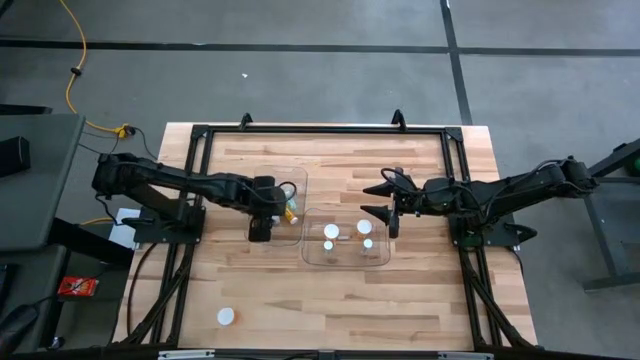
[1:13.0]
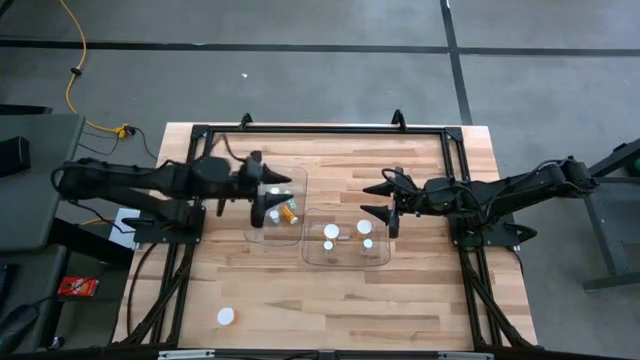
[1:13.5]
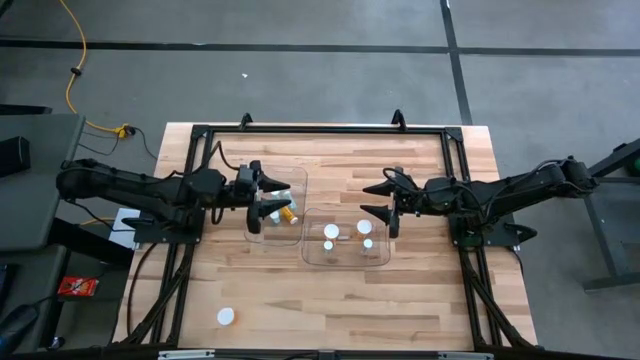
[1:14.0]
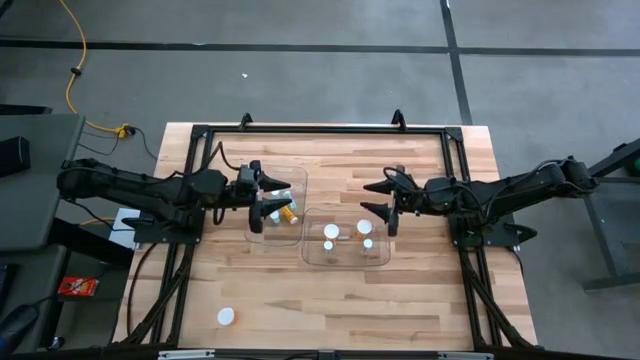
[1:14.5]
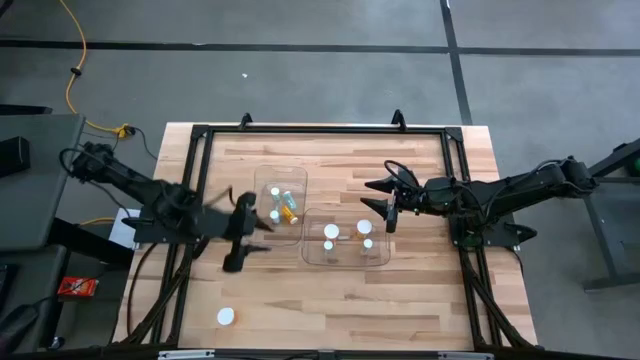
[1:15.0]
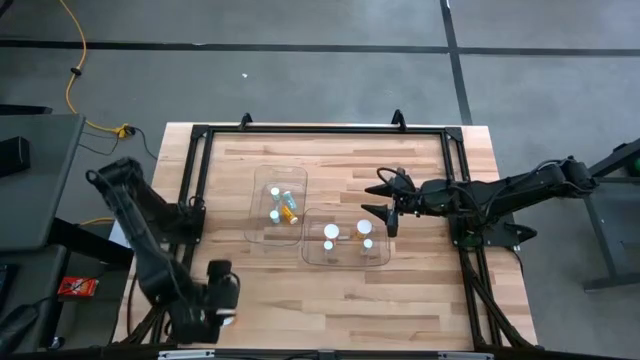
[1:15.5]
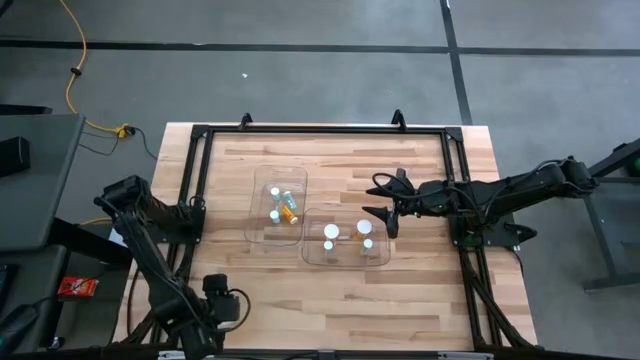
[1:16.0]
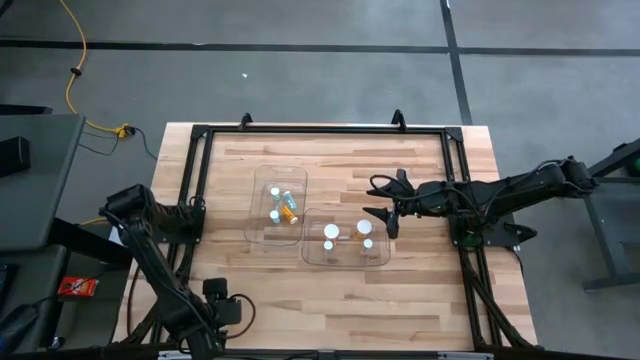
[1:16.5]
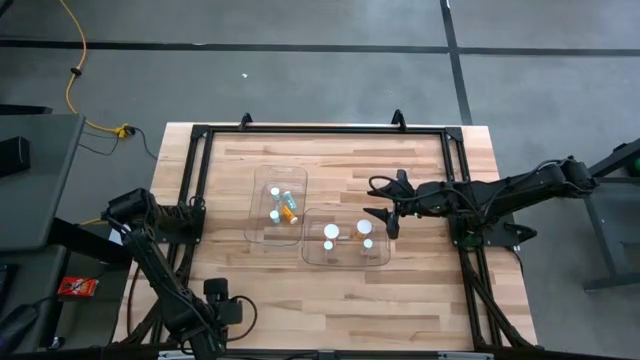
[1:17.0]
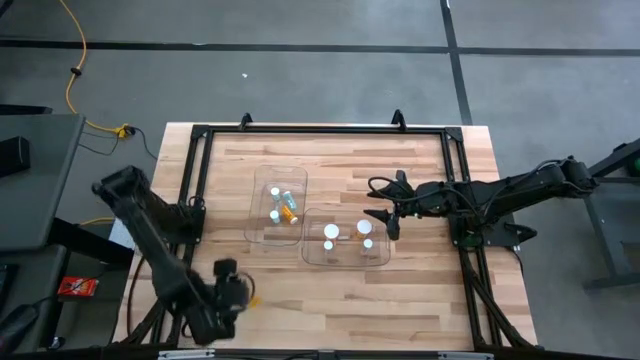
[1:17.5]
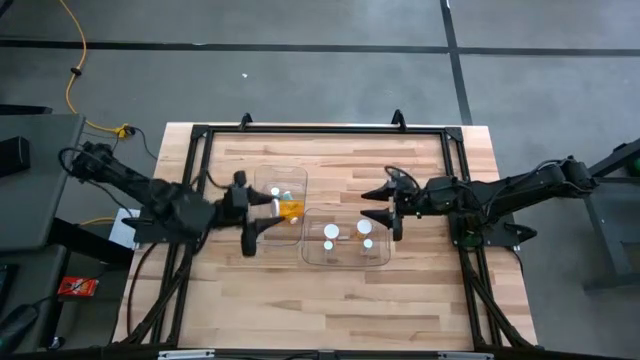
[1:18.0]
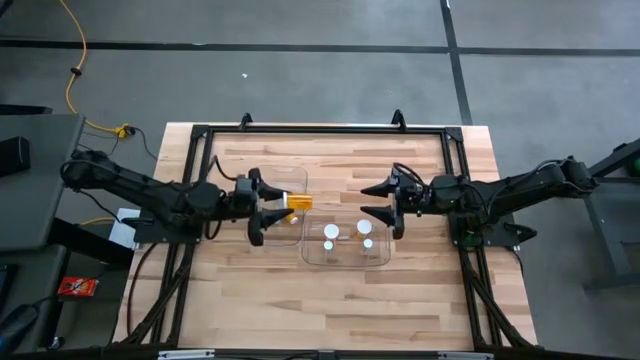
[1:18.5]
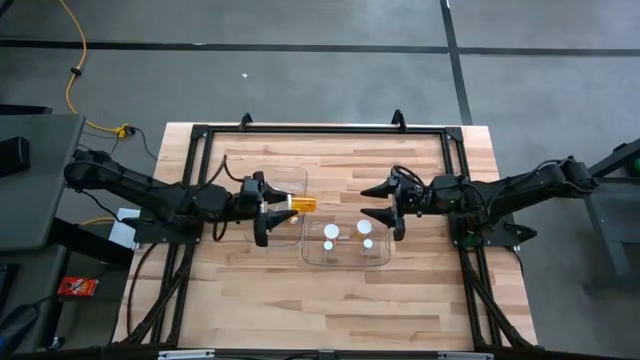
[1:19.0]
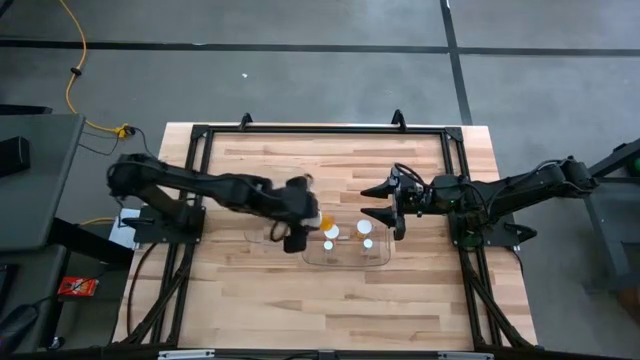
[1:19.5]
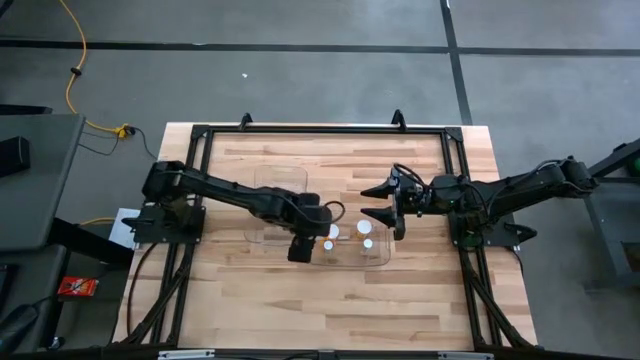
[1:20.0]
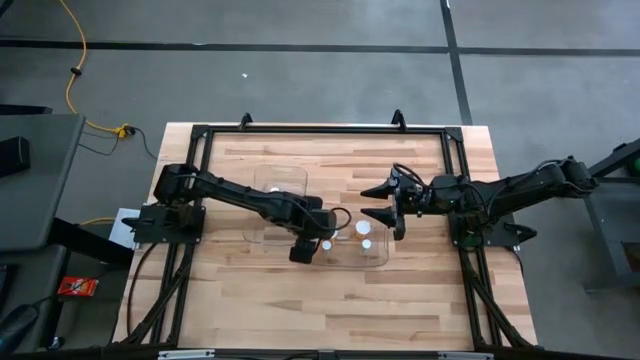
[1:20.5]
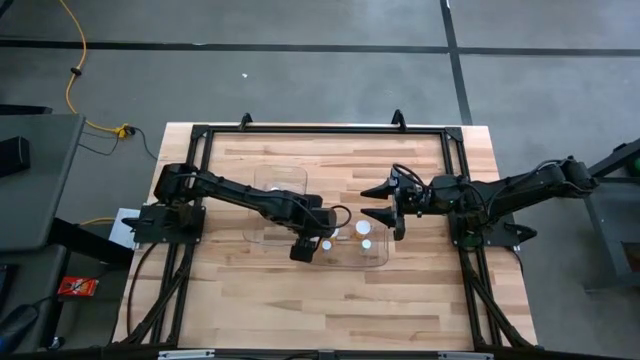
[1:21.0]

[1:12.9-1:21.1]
Task: Pick and place medicine bottles into bin by pill shape (circle, oval)
Put the orange capsule bottle into the right transparent bin

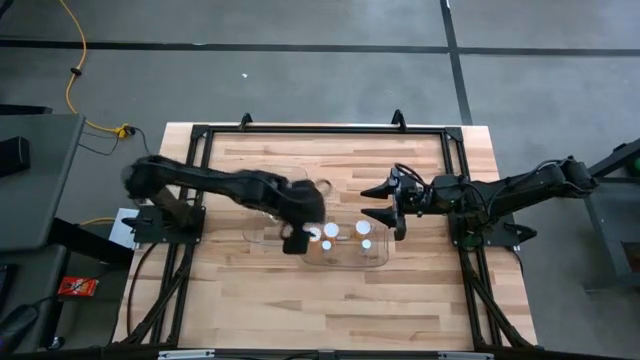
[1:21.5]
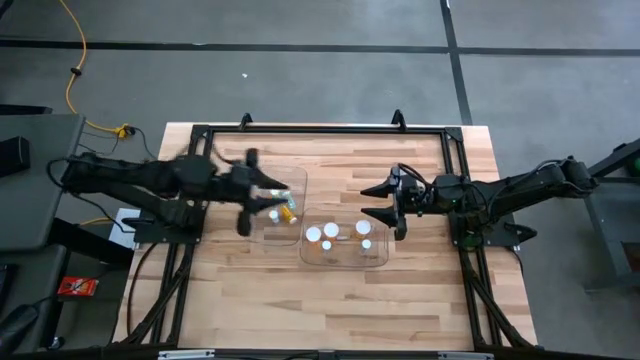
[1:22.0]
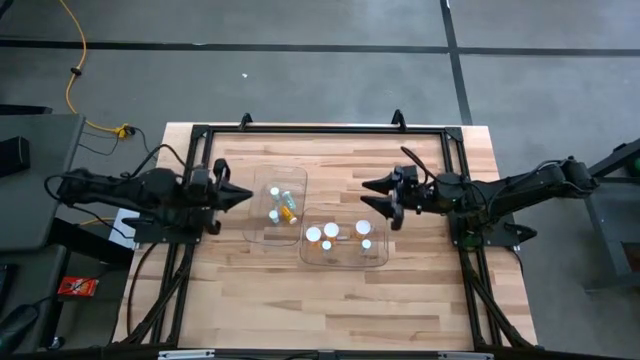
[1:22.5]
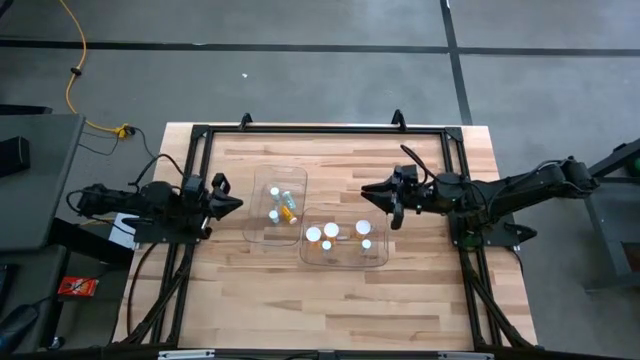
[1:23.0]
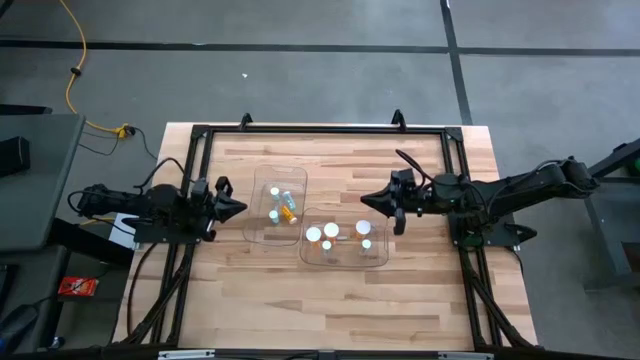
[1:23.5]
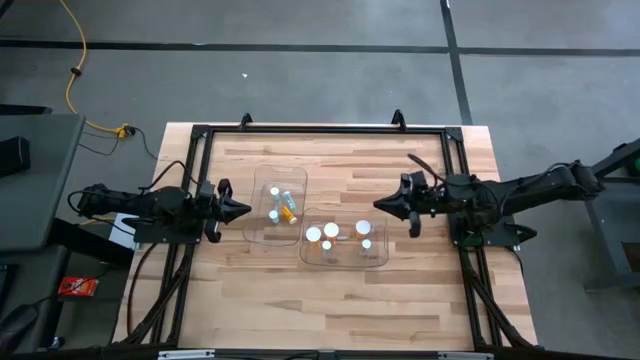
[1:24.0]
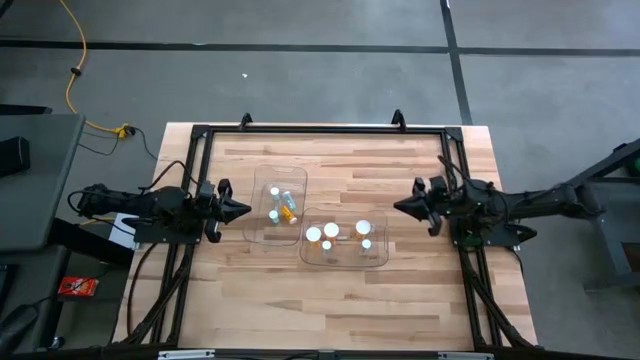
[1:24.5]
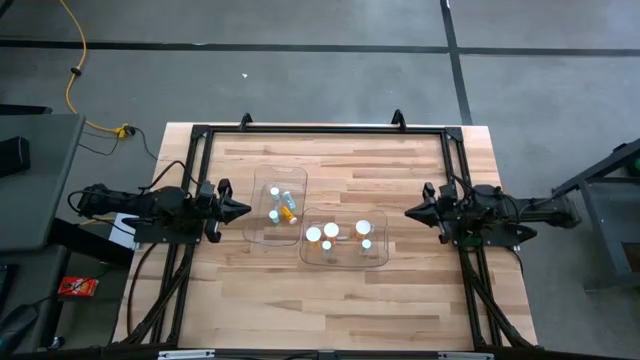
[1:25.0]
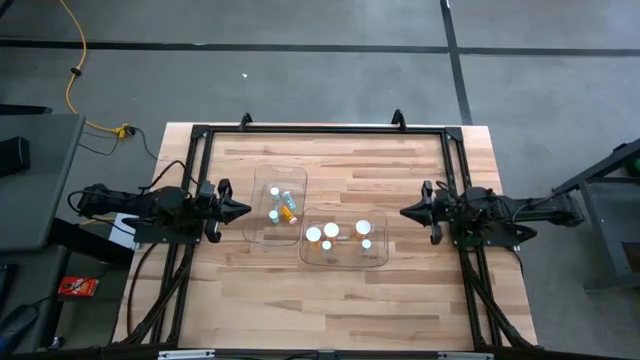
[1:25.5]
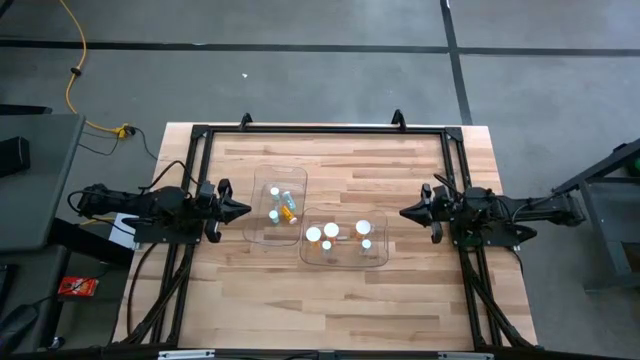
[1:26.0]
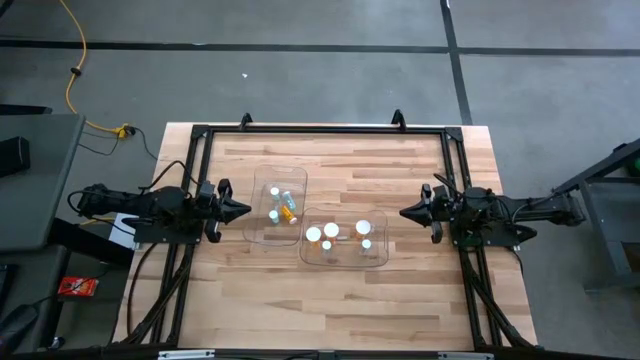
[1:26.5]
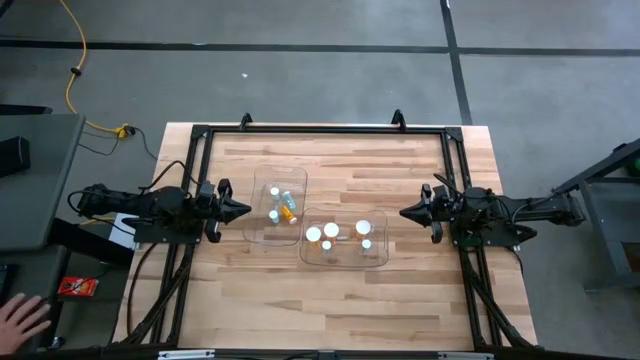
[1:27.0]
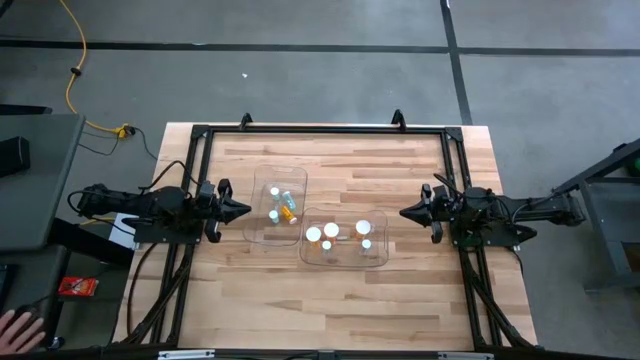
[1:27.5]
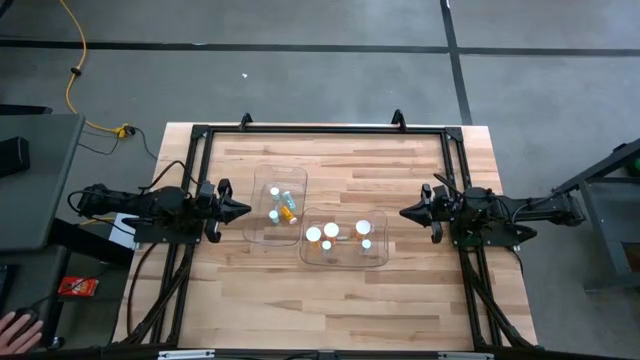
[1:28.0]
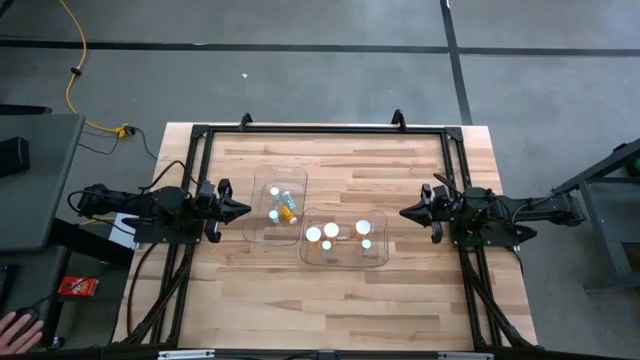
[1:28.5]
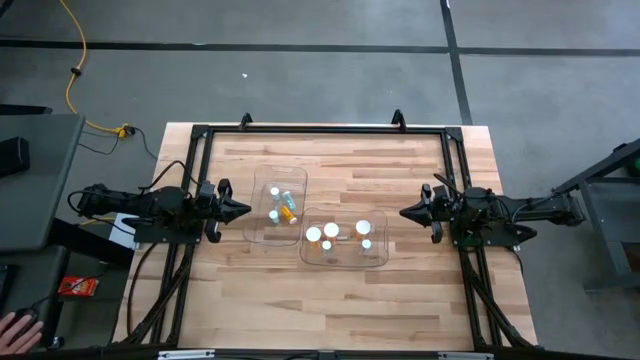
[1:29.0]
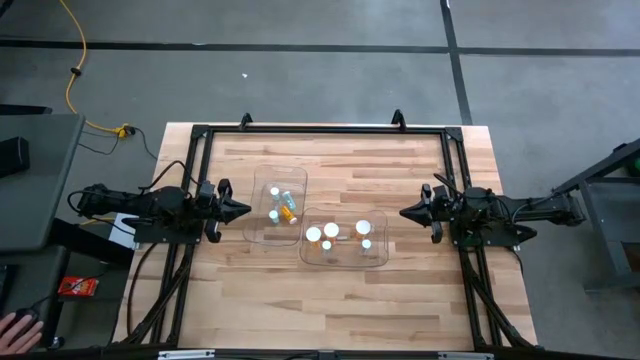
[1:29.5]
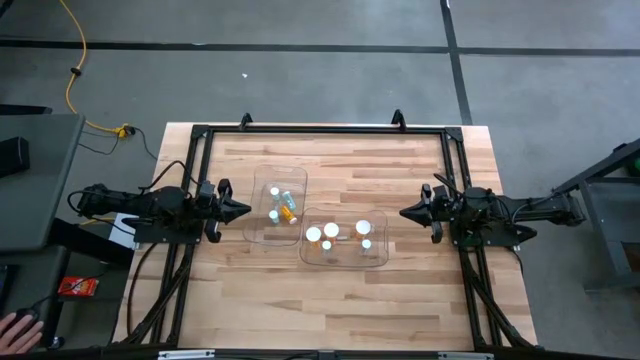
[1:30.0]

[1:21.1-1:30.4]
Return to Home Position

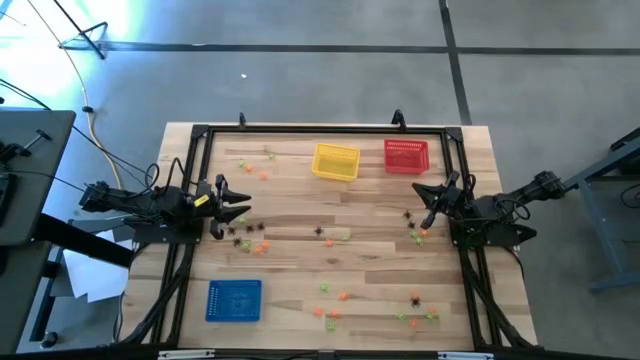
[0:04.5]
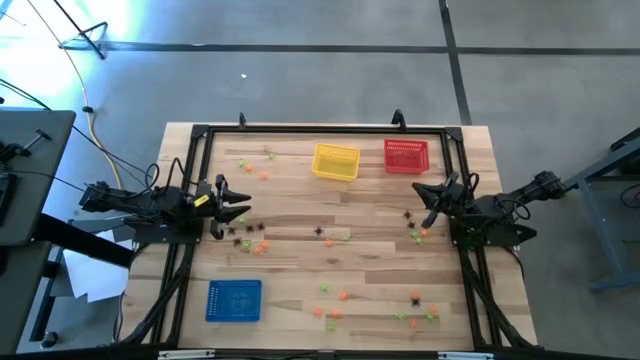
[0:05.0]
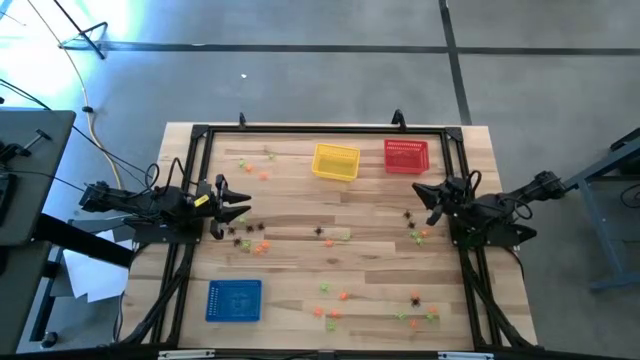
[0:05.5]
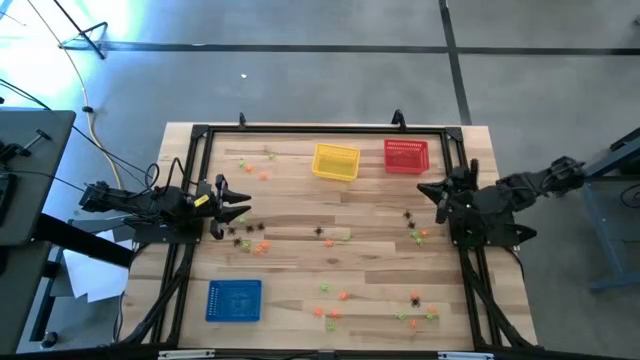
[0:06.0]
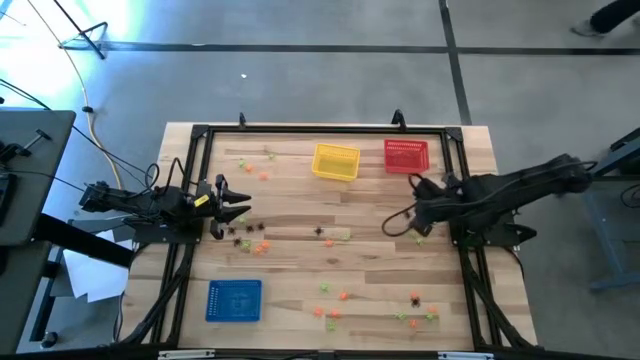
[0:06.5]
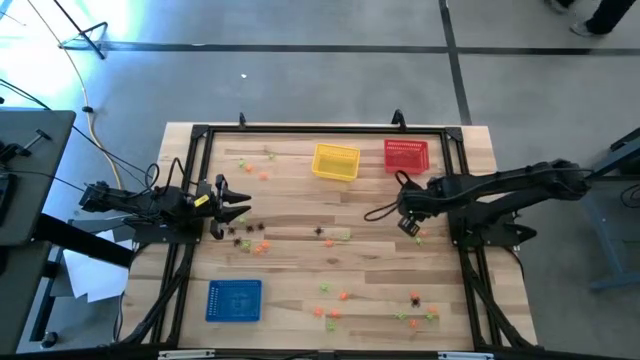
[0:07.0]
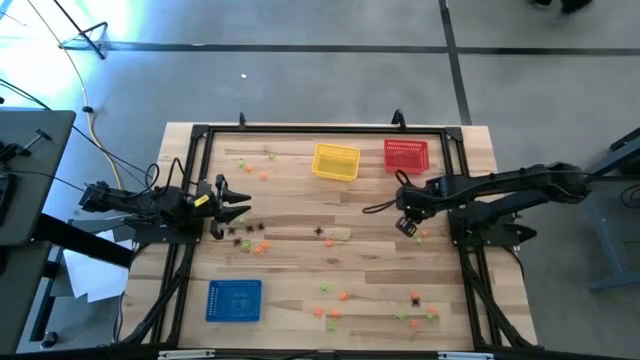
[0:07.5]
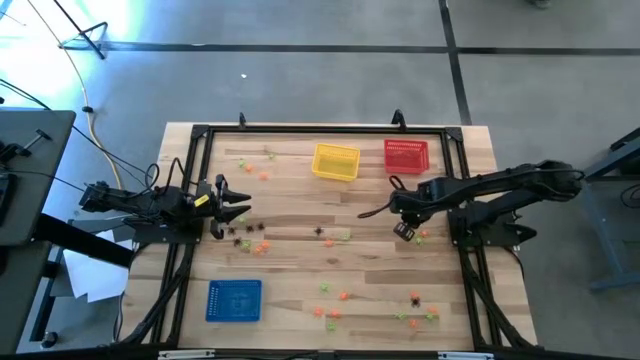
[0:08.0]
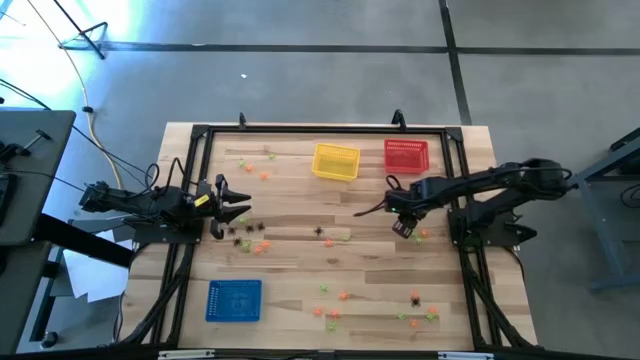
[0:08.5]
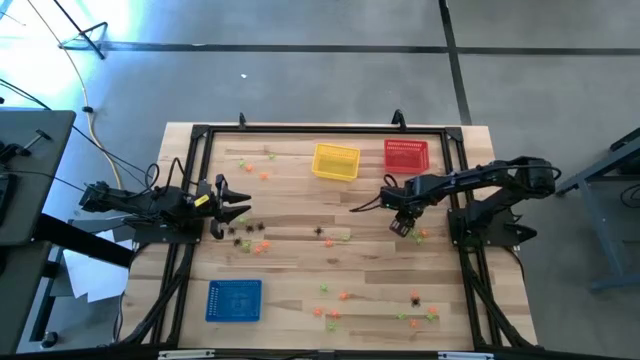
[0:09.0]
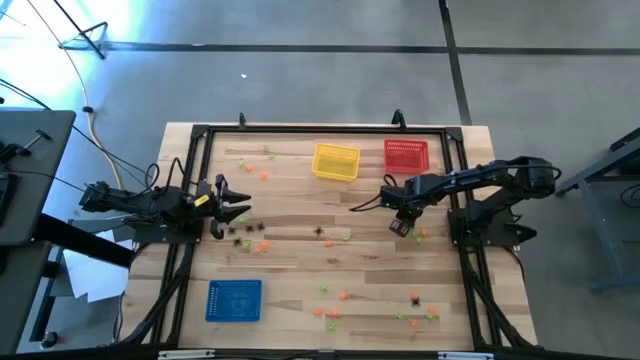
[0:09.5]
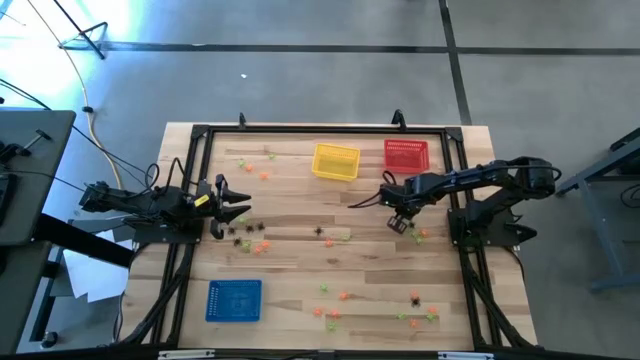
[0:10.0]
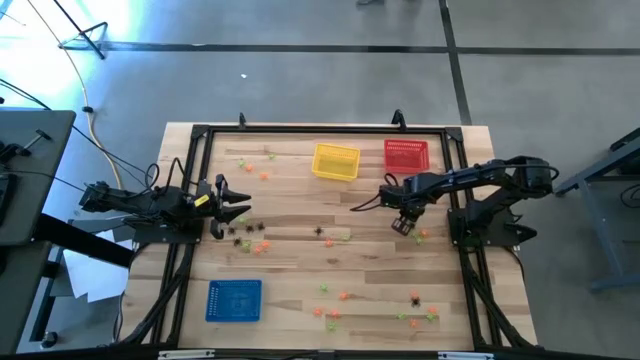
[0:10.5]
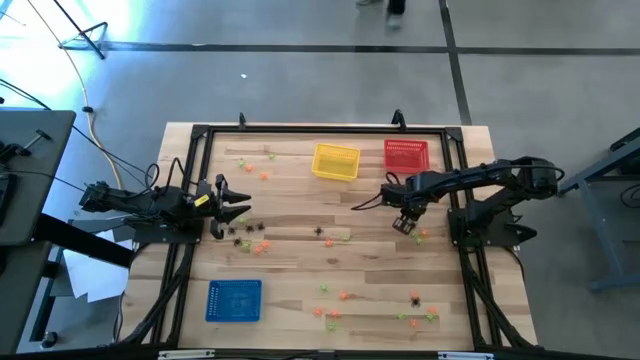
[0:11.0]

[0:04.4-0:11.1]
Task: Sort Halloween decoration
Put the black spider toy into the red bin
